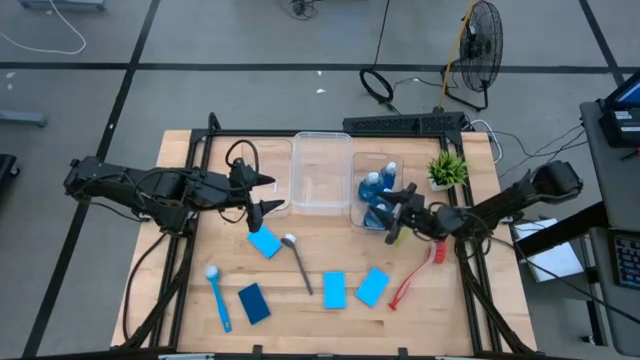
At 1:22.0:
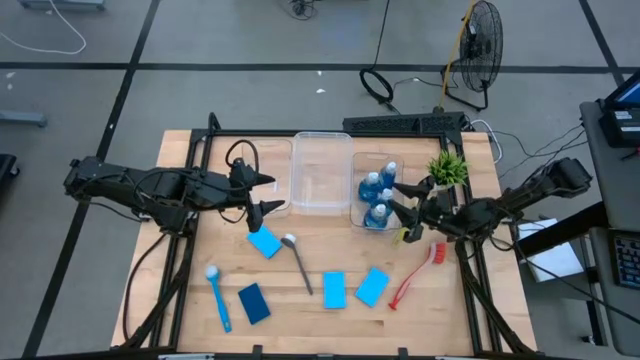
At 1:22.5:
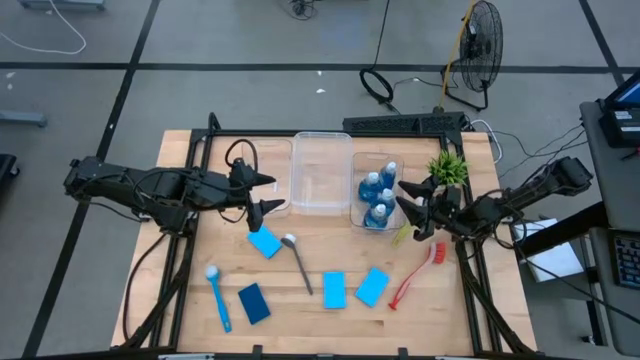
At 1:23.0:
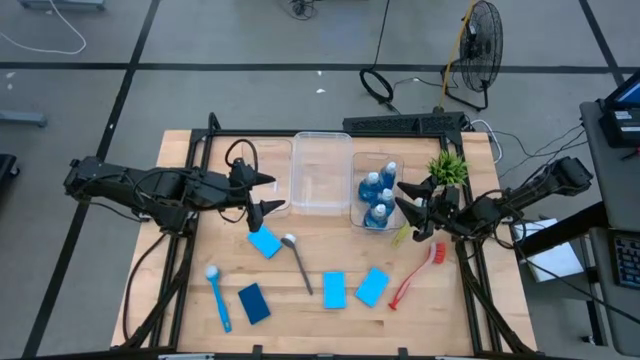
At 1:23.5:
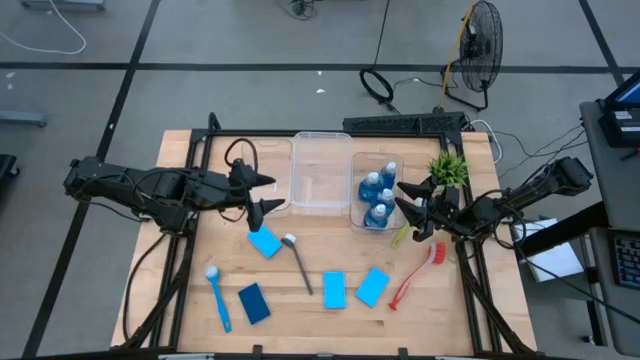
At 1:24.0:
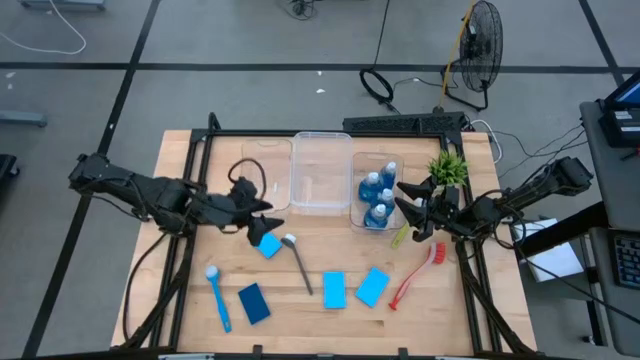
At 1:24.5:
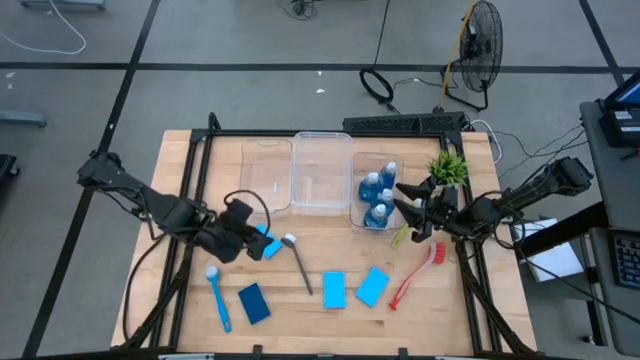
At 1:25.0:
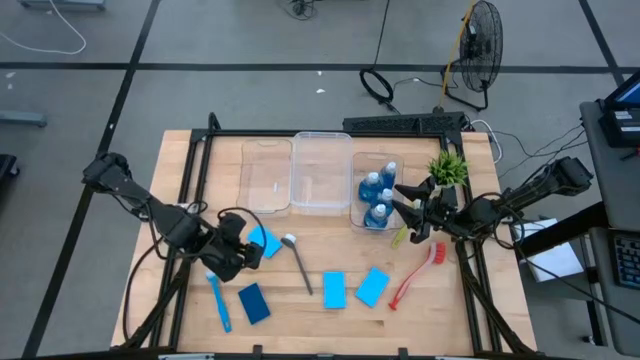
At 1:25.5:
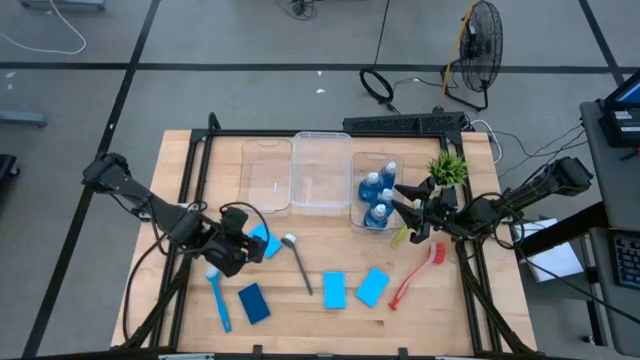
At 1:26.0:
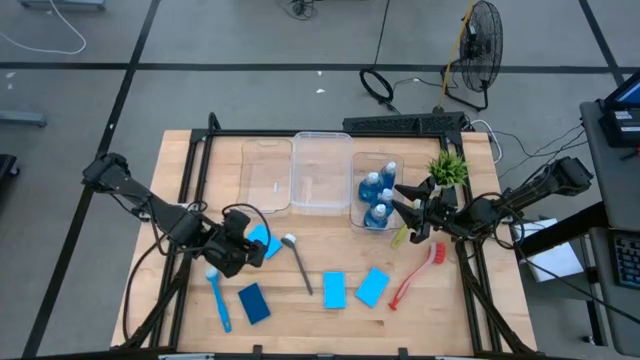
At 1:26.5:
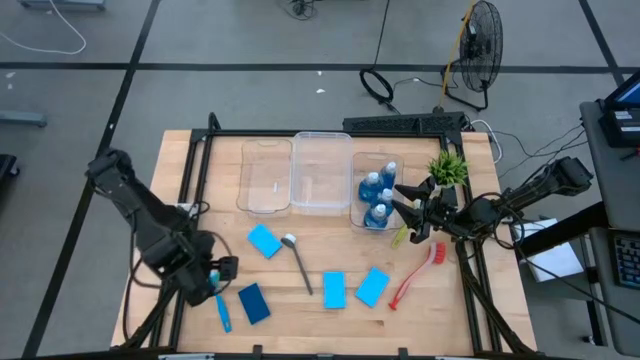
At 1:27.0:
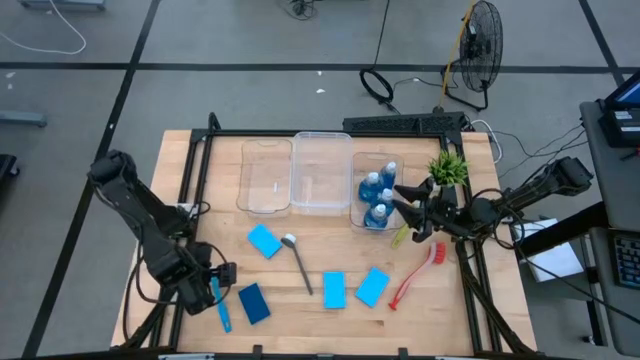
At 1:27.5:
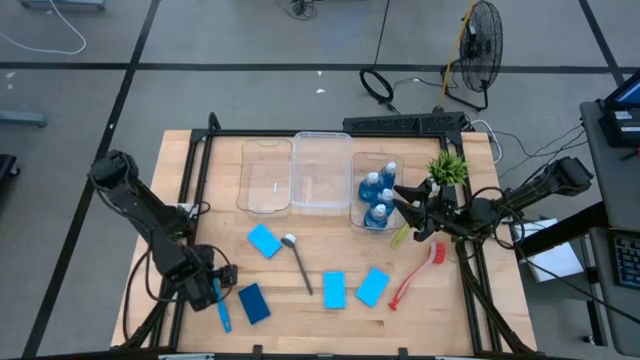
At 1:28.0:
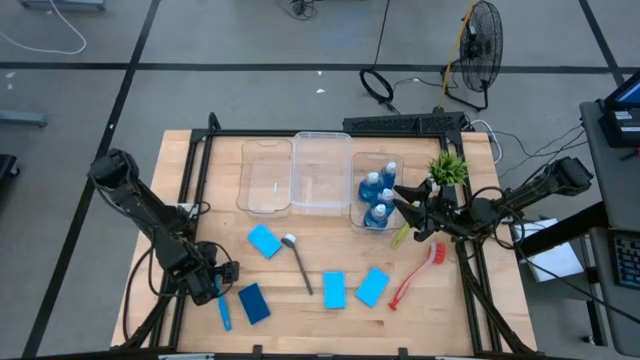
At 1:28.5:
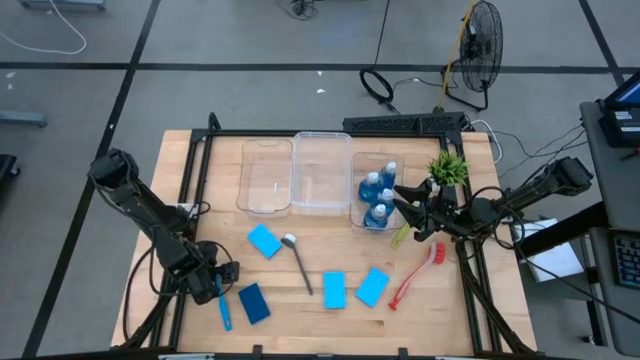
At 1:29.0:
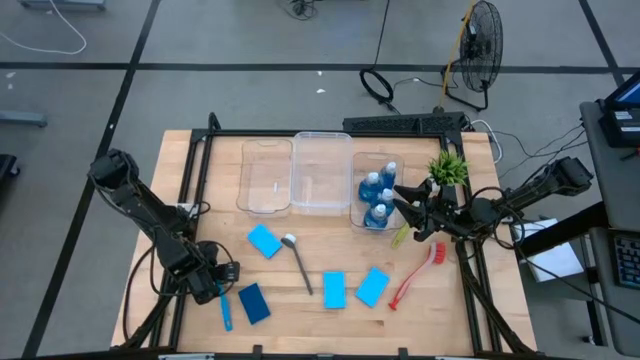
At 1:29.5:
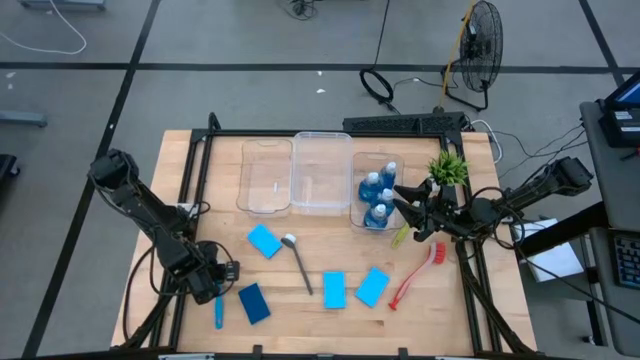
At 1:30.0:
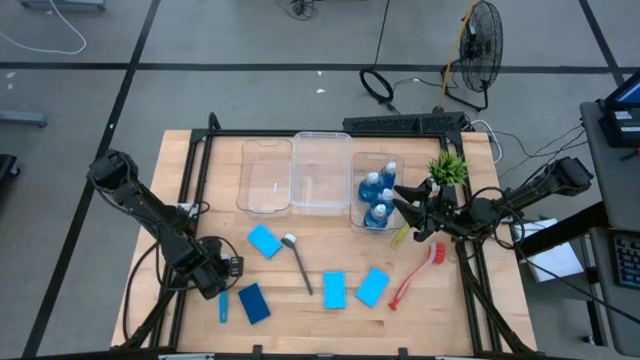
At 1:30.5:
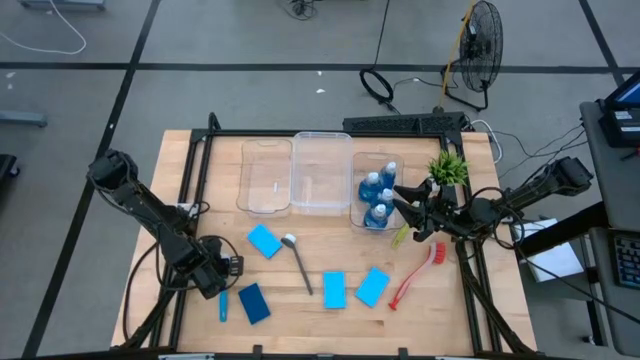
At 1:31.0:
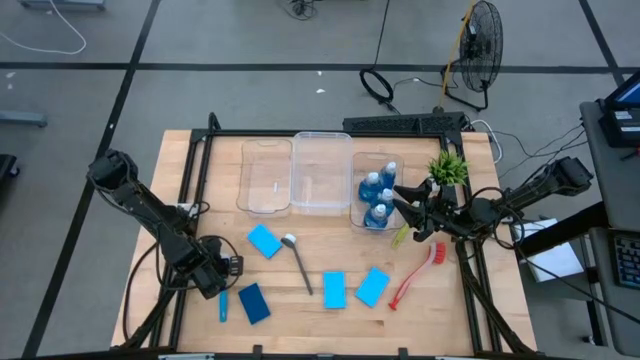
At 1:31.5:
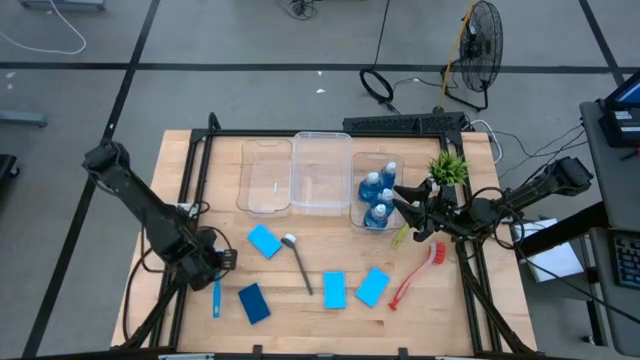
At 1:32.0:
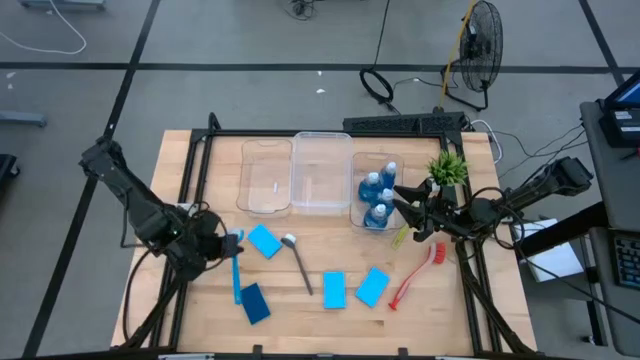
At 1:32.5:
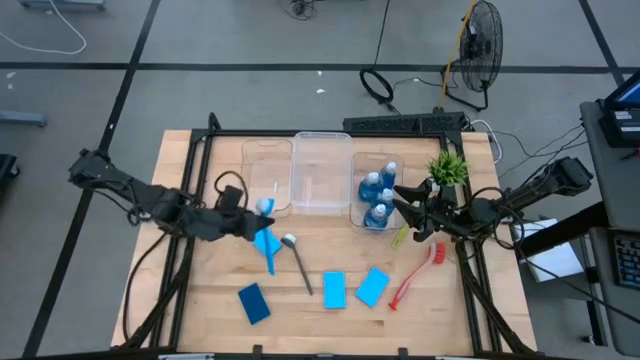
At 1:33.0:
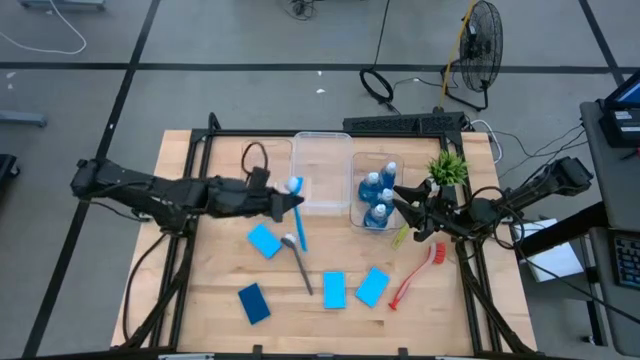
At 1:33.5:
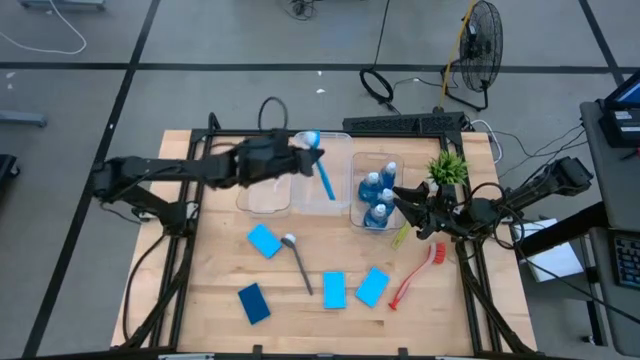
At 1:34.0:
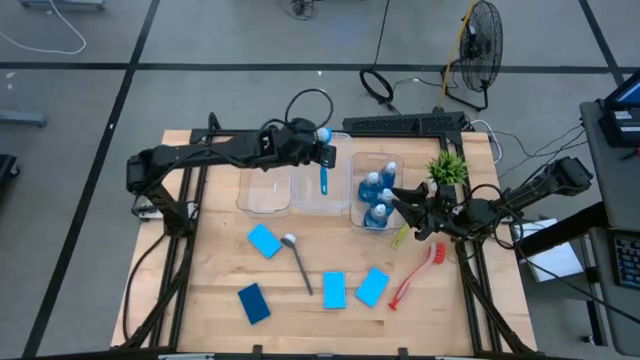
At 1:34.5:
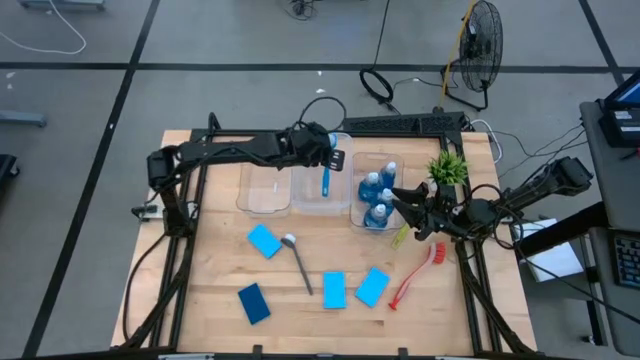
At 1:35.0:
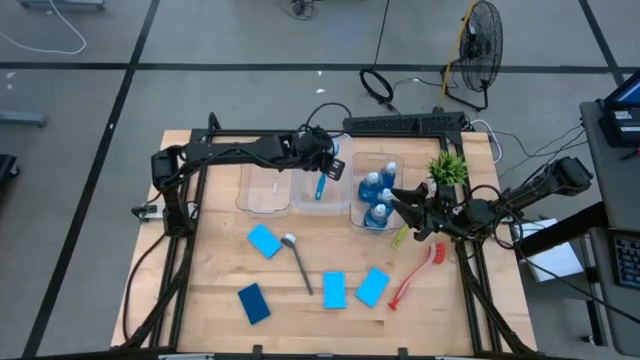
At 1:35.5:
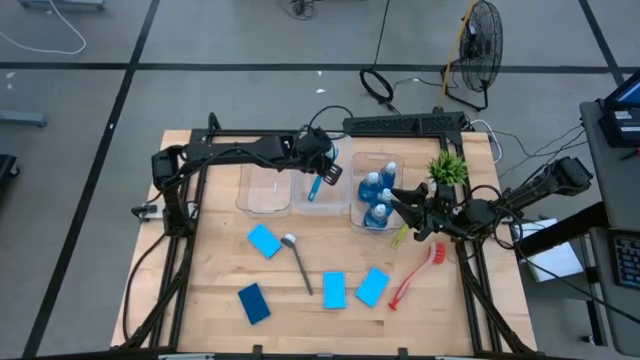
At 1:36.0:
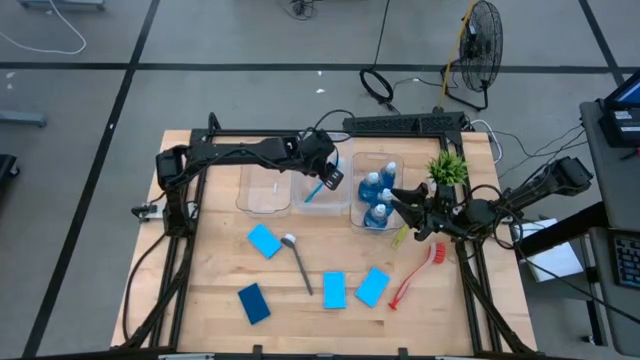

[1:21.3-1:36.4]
Task: Pick & Place Kitchen Sink Supplies
Put the blue dish brush into the white transparent bin

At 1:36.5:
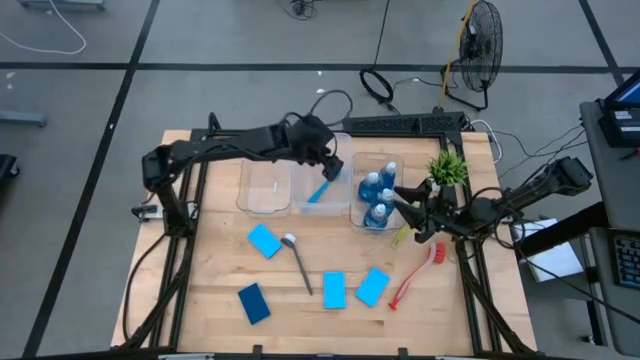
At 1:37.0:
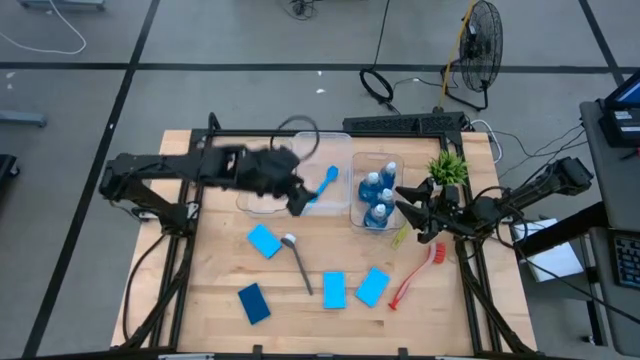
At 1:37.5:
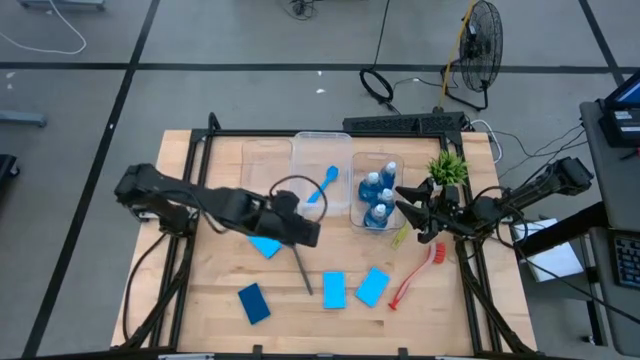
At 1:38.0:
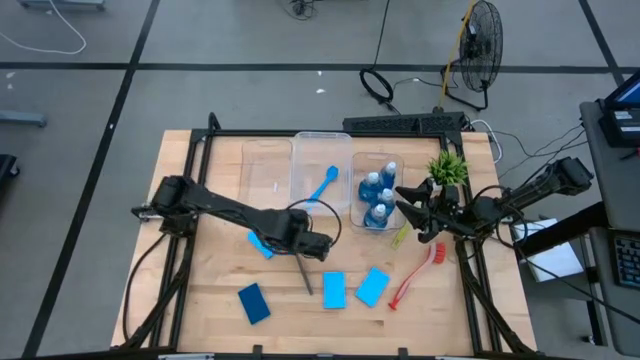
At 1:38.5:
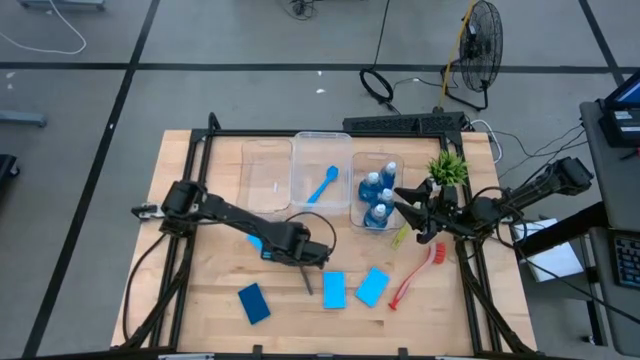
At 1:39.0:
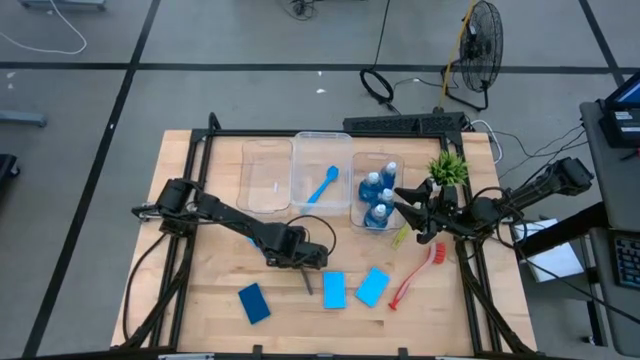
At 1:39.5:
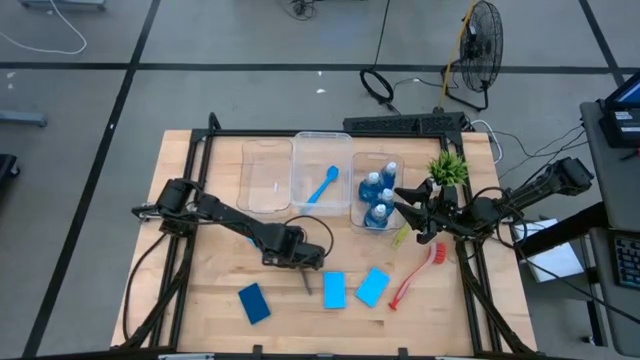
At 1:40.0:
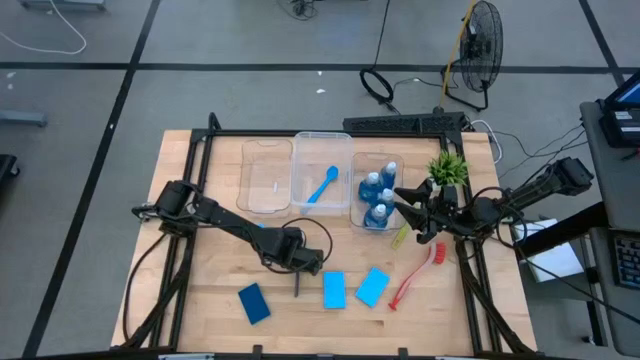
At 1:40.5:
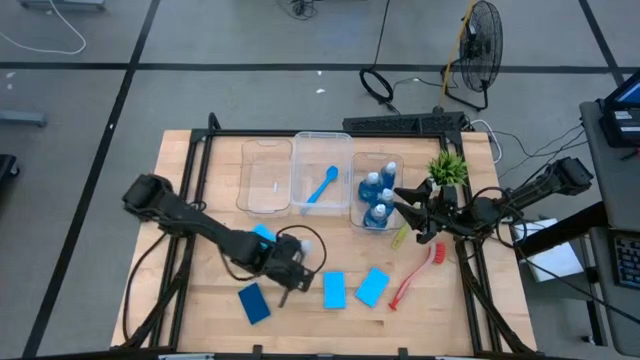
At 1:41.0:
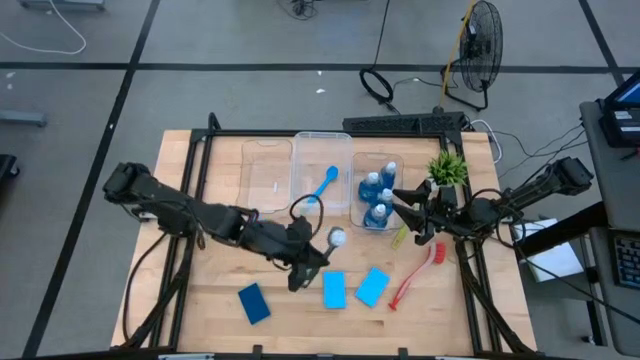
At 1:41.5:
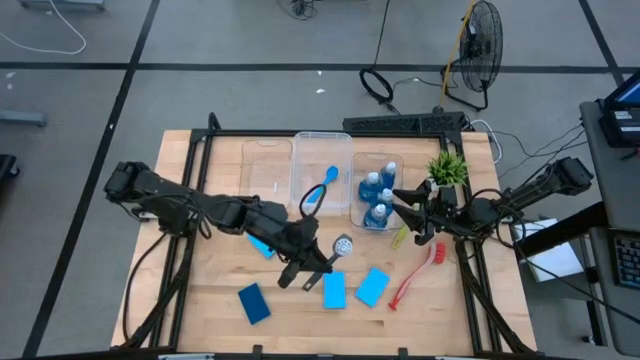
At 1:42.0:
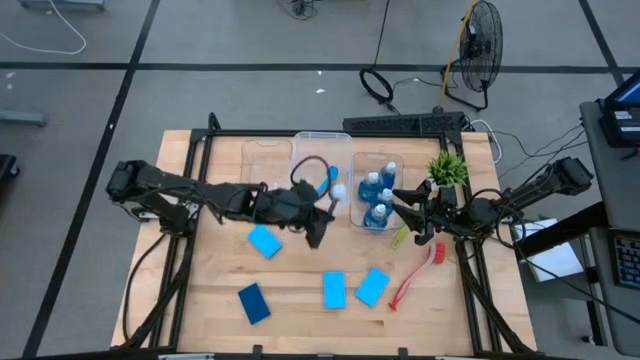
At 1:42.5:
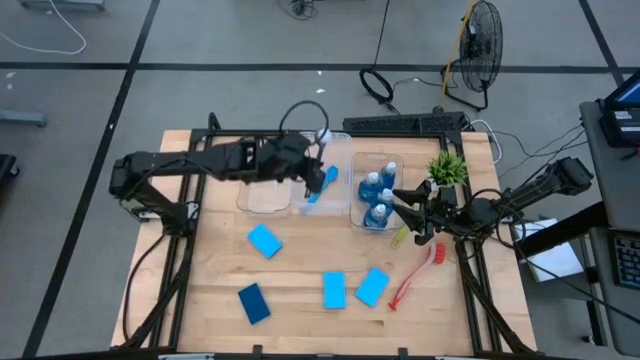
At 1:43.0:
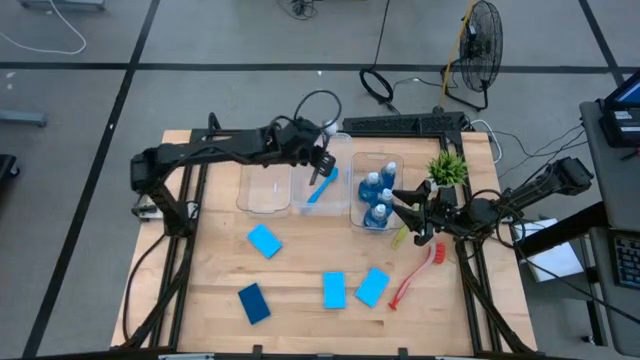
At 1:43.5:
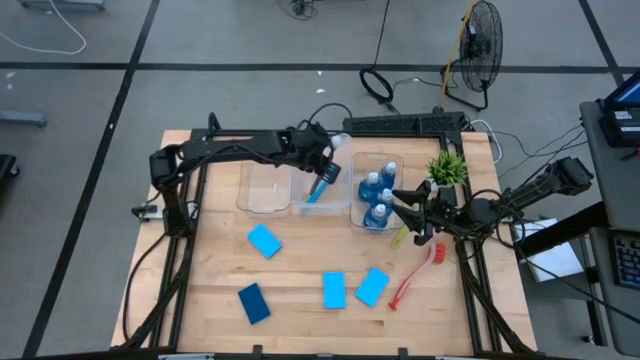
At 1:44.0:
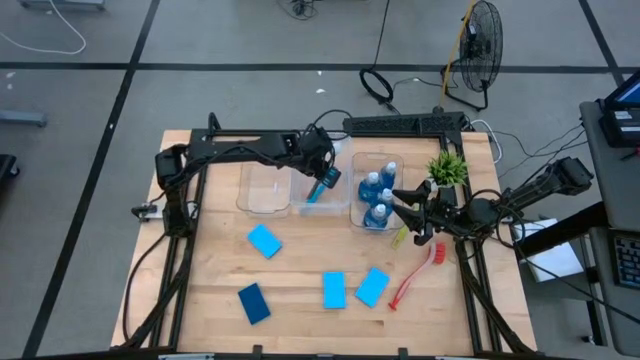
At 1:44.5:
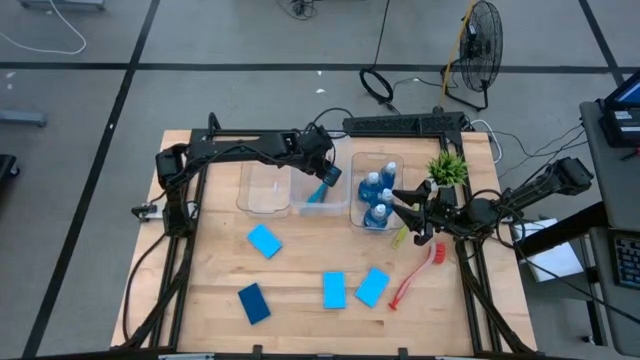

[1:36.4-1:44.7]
Put the gray dish brush into the white transparent bin
